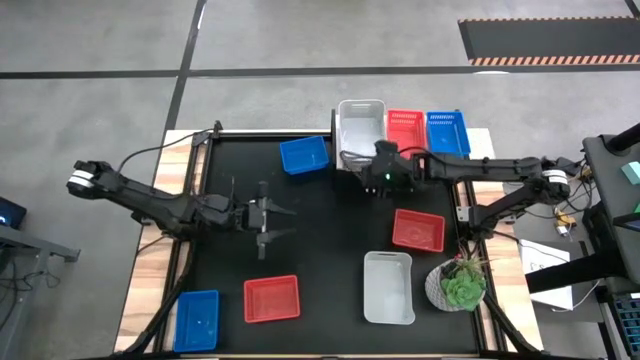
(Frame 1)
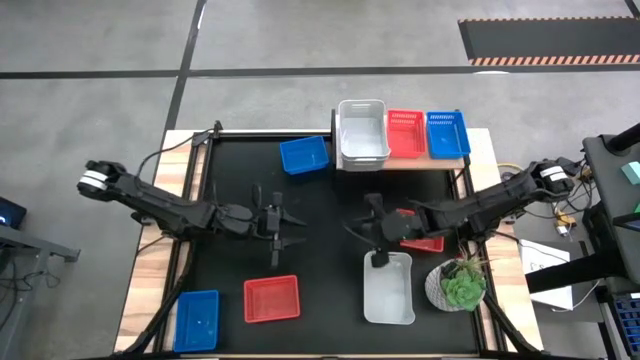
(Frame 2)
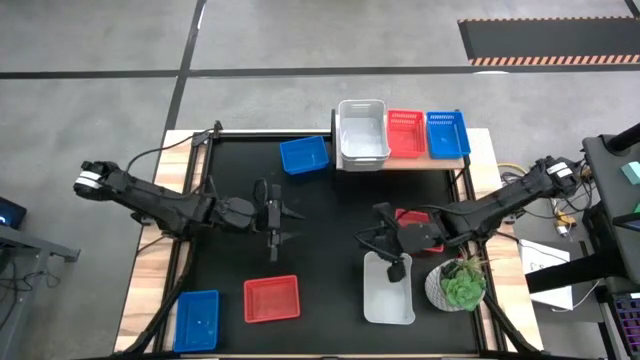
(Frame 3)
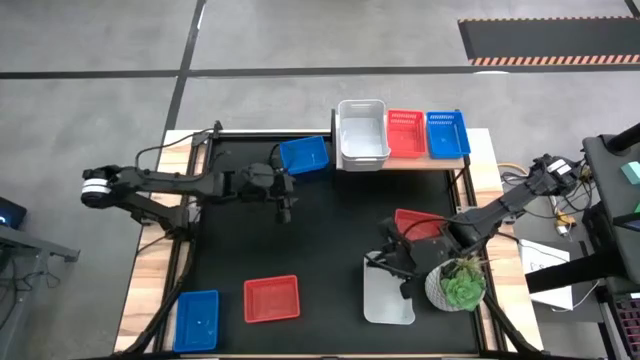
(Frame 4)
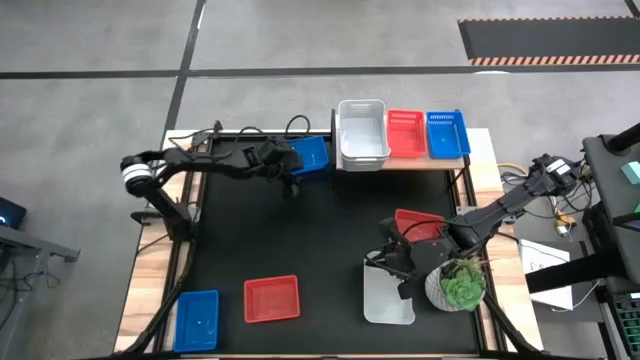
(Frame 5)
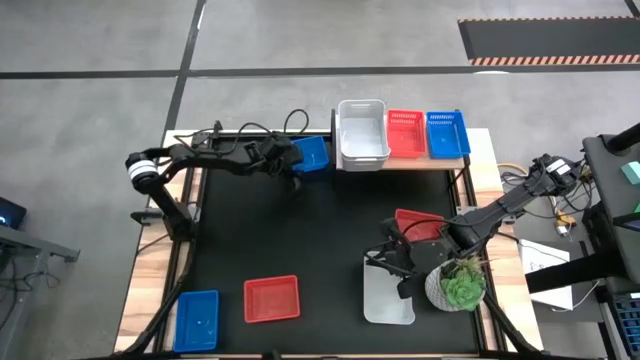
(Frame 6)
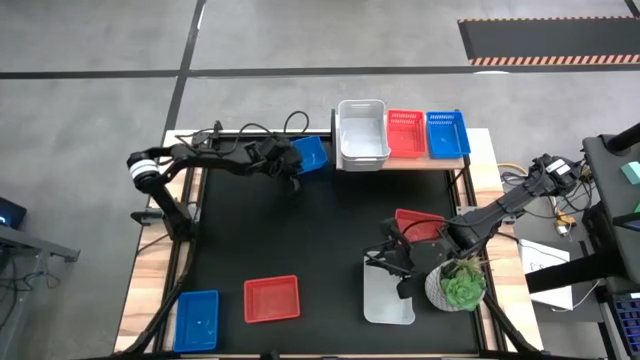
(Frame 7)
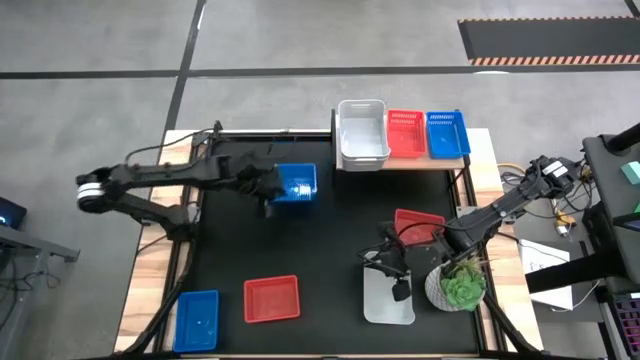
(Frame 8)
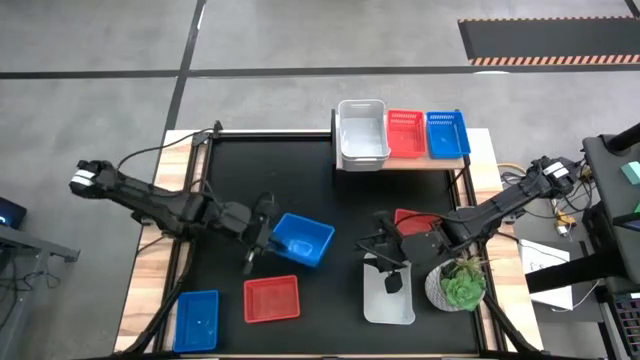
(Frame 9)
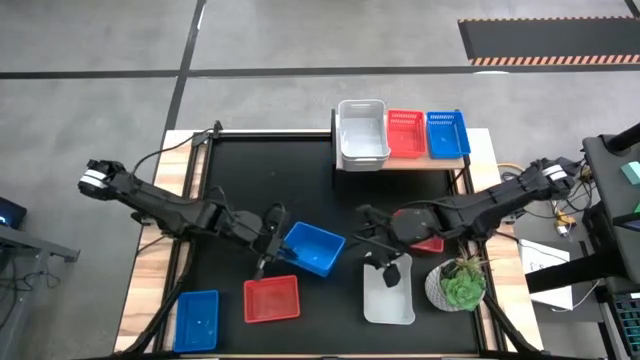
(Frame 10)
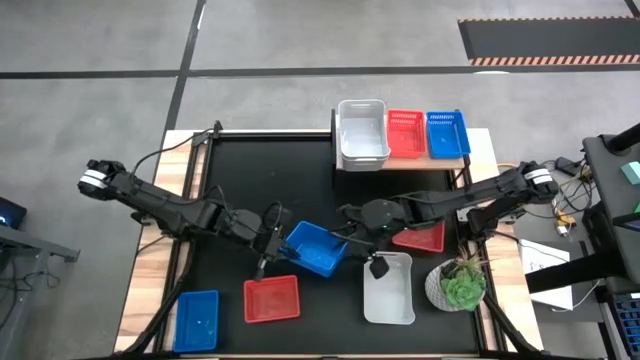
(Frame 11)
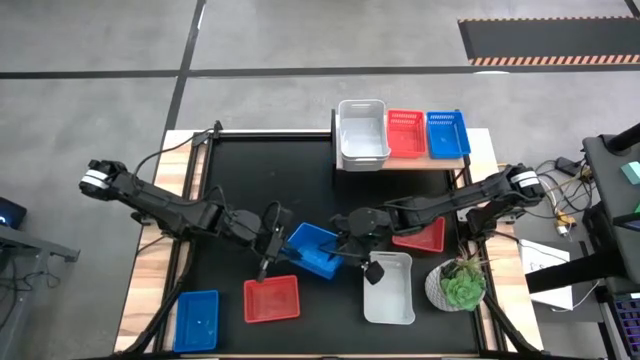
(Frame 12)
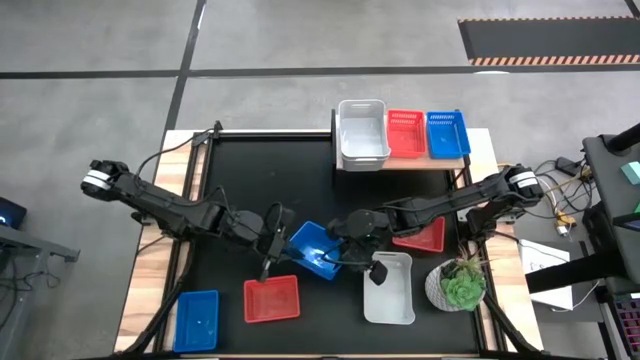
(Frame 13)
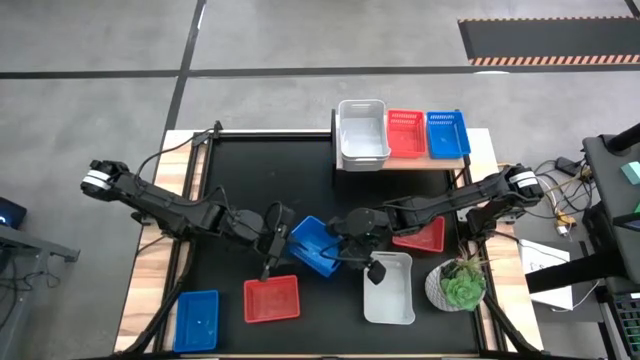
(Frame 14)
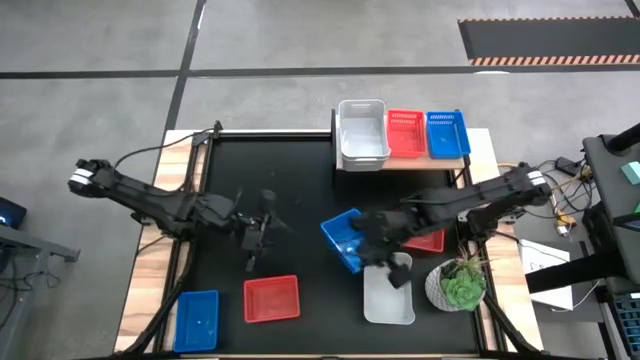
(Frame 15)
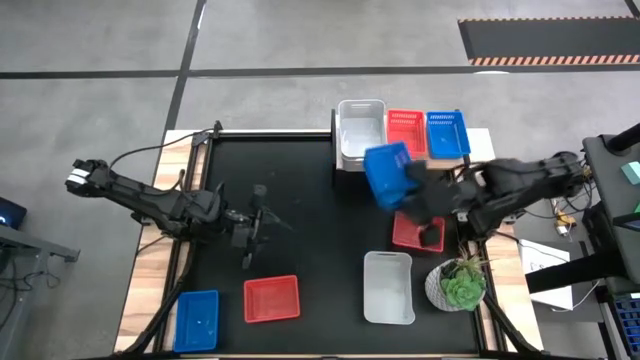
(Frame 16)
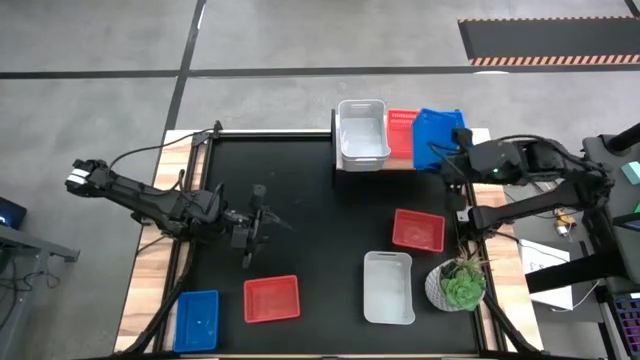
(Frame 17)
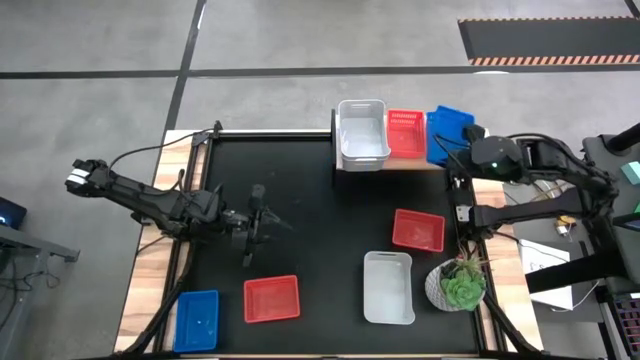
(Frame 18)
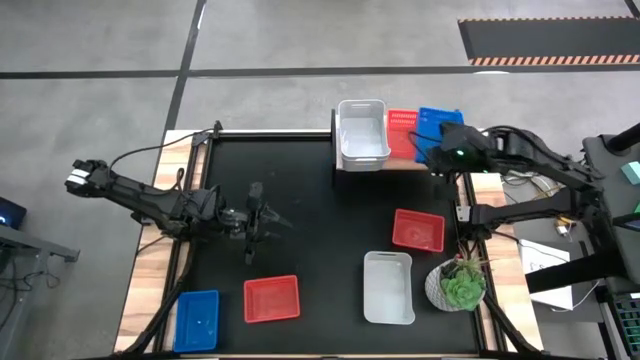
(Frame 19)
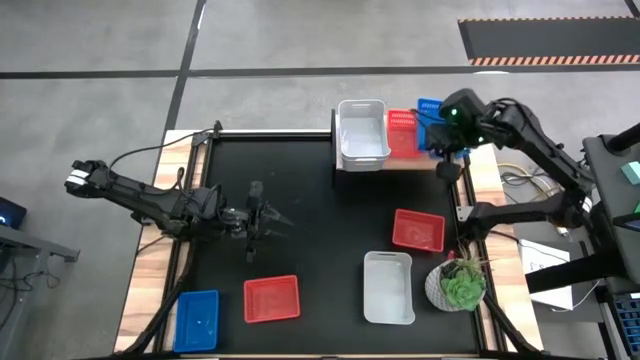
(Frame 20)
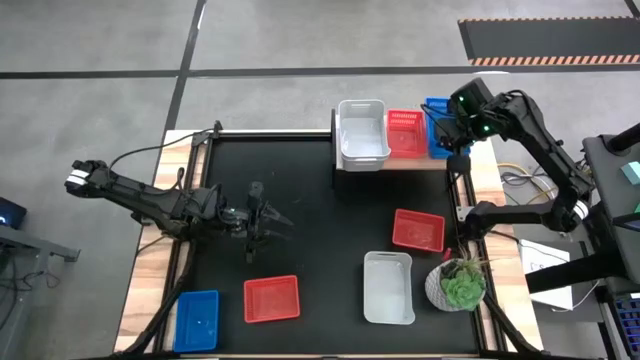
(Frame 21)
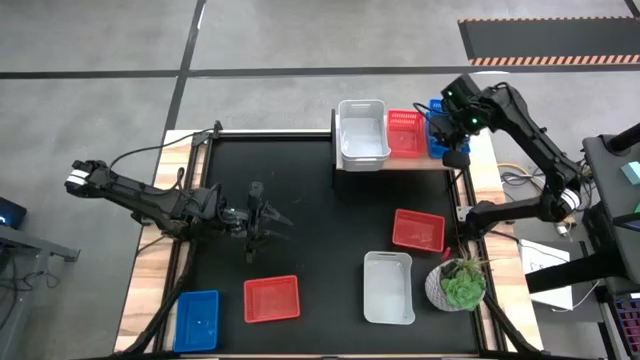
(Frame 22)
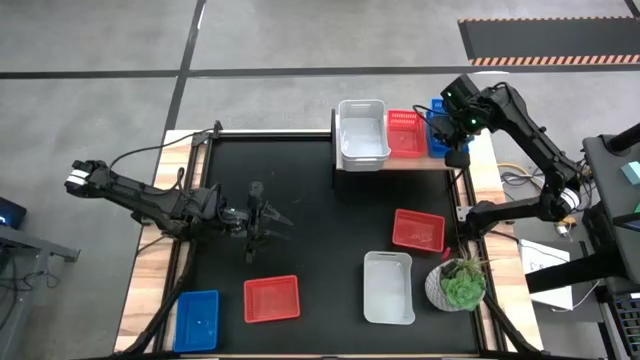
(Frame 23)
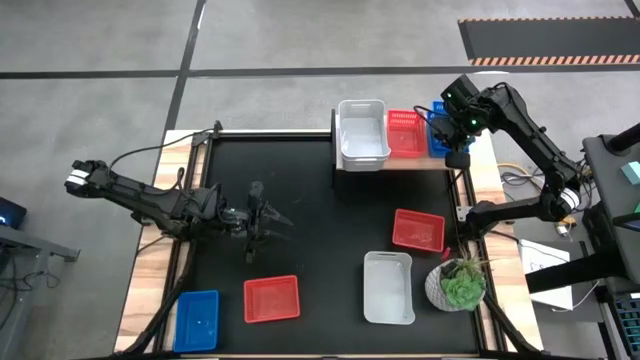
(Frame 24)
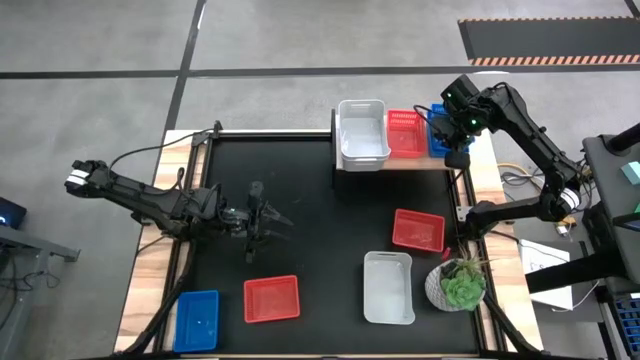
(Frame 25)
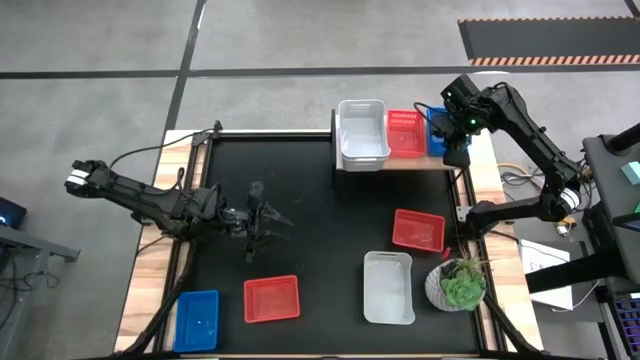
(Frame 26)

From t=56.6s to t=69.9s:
Task: Stack baskets on shelf by color
Stack the top blue bin on top of the blue bin on the shelf
